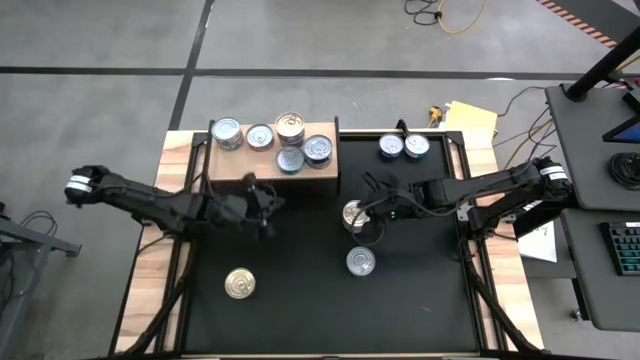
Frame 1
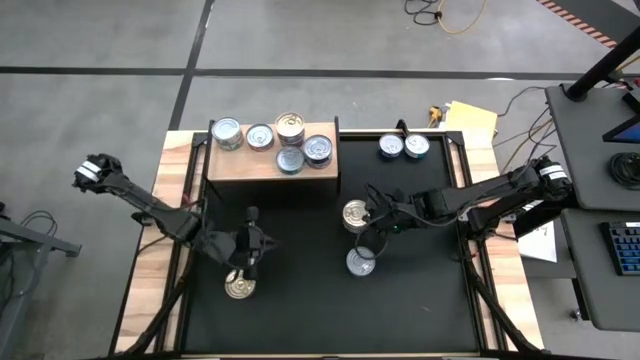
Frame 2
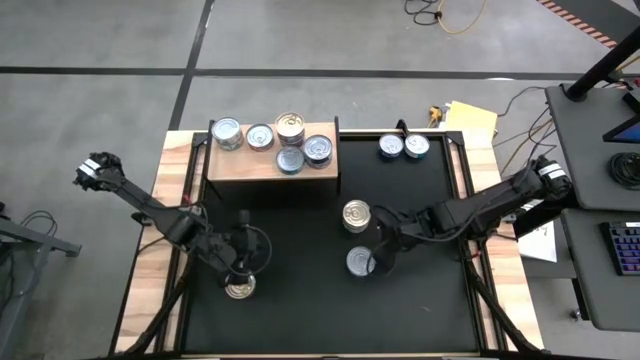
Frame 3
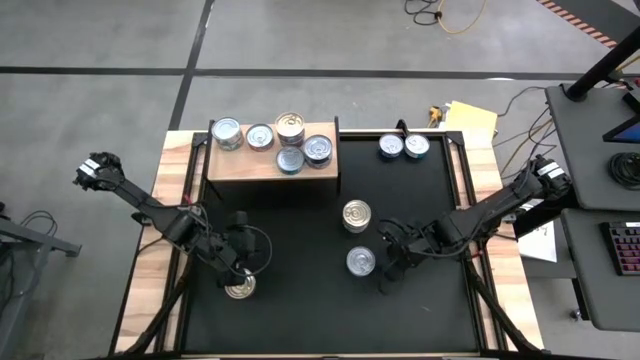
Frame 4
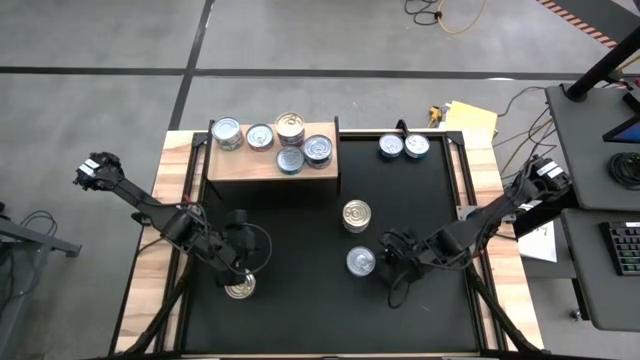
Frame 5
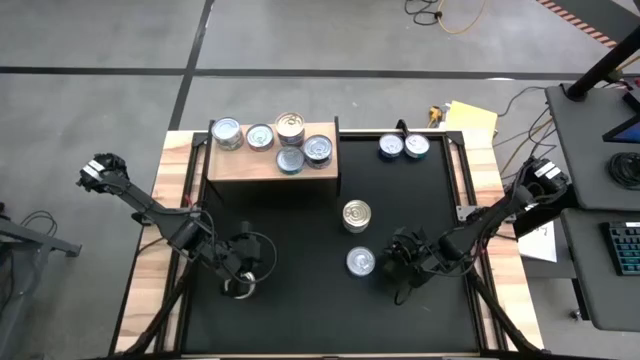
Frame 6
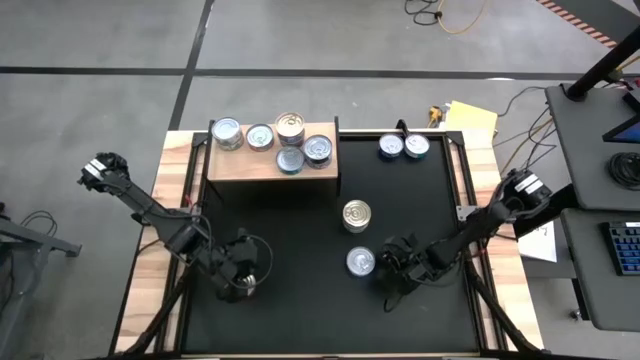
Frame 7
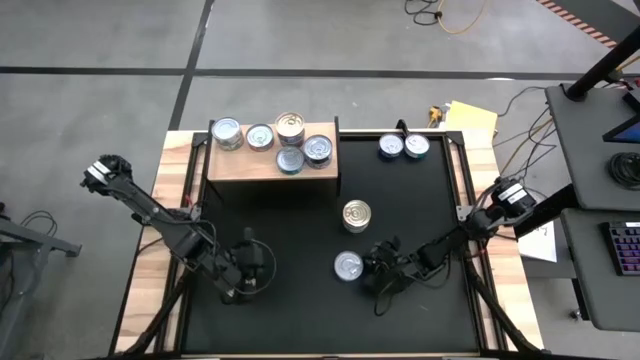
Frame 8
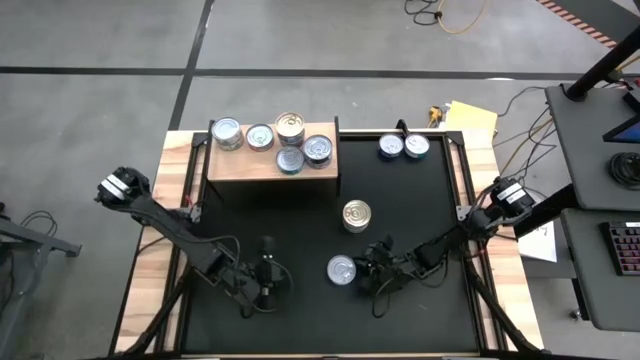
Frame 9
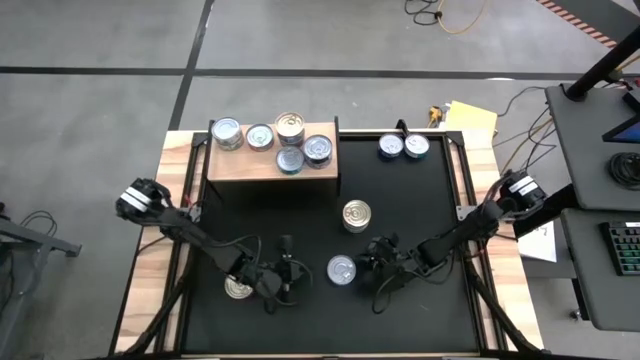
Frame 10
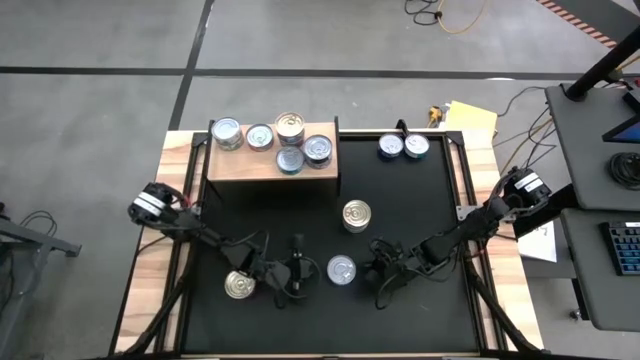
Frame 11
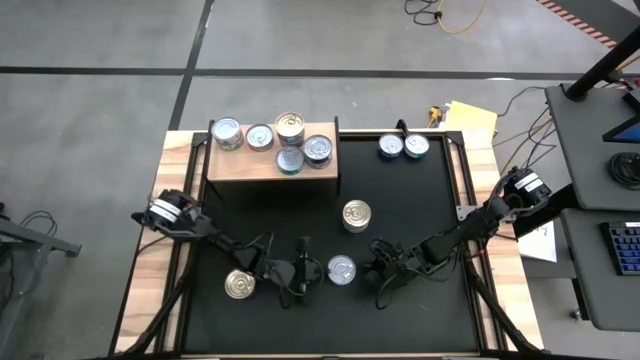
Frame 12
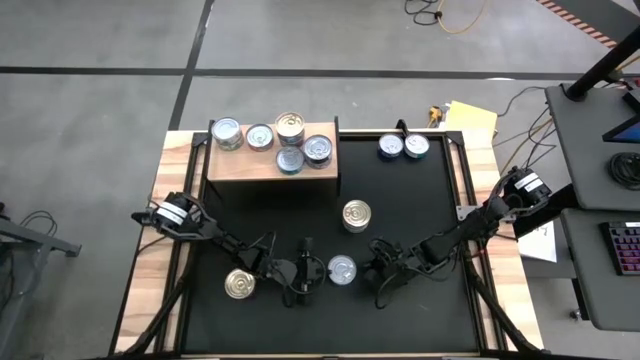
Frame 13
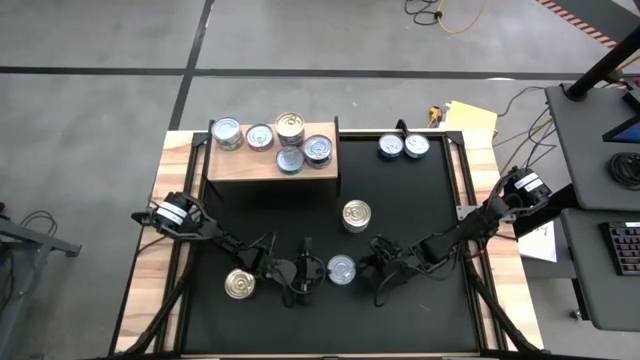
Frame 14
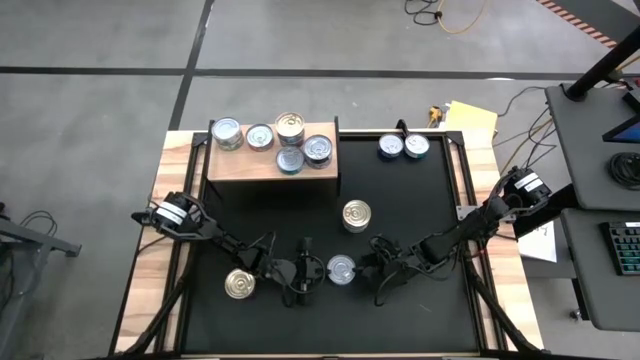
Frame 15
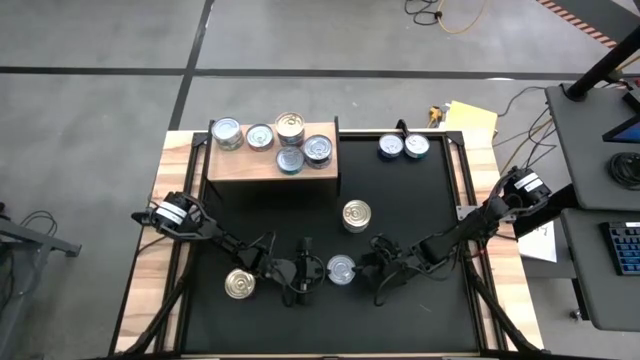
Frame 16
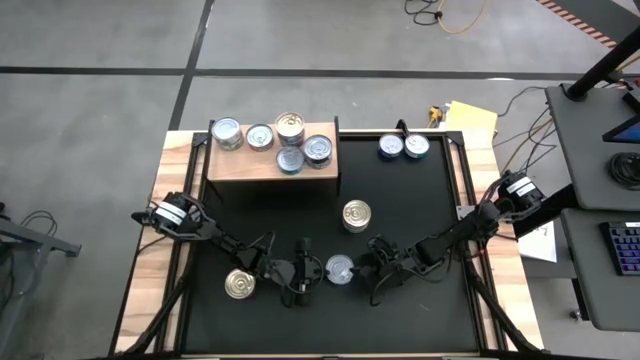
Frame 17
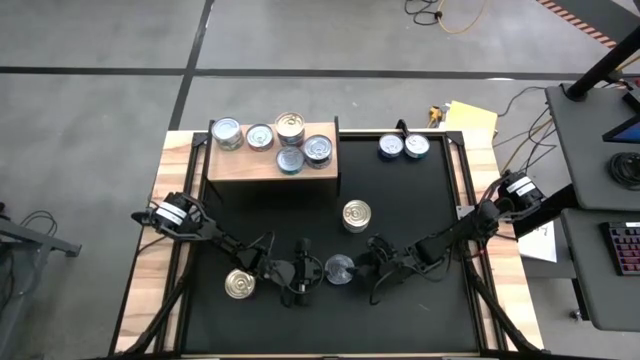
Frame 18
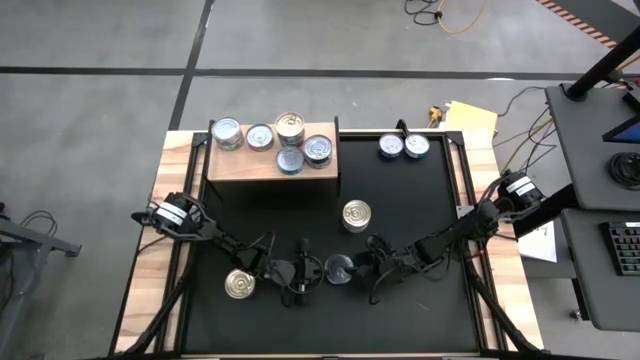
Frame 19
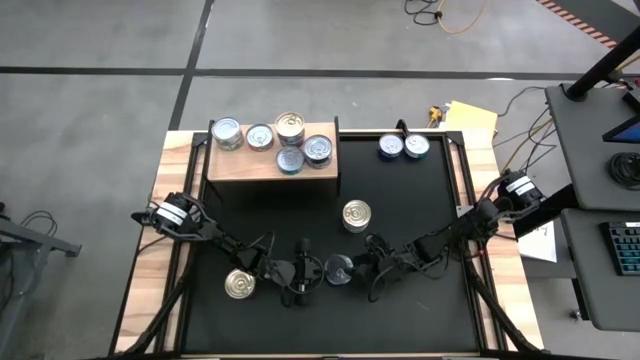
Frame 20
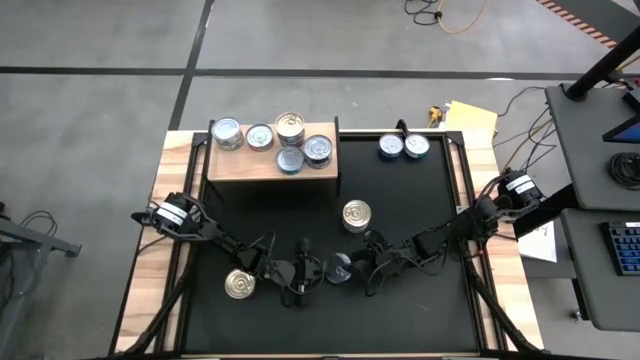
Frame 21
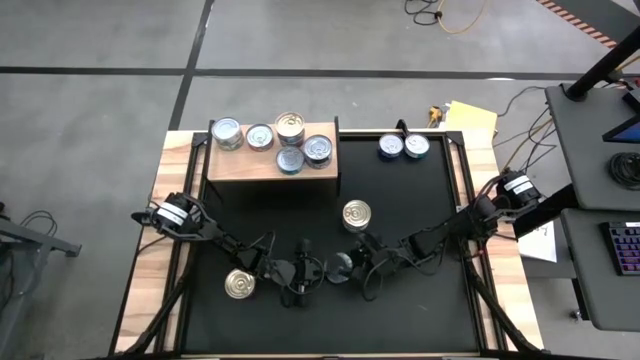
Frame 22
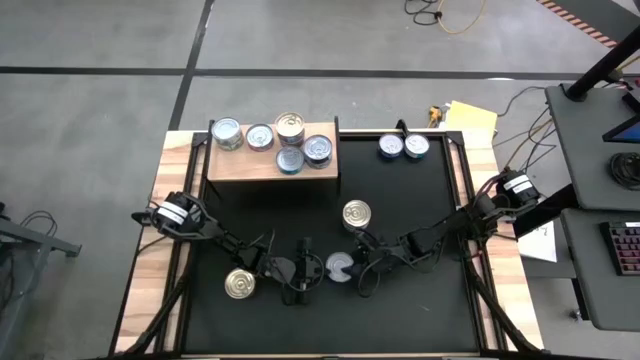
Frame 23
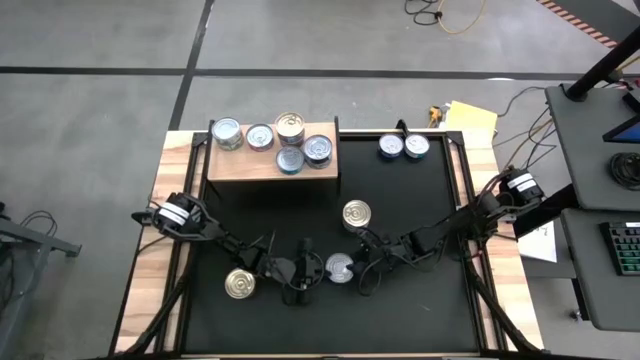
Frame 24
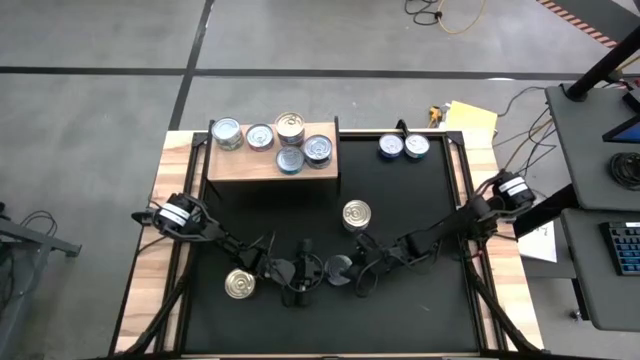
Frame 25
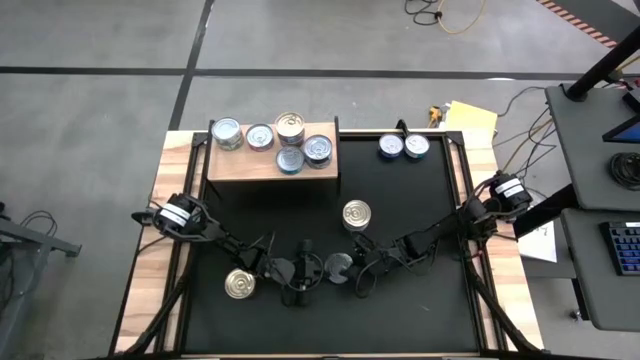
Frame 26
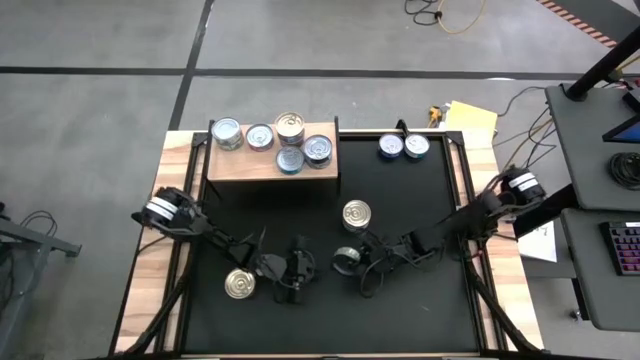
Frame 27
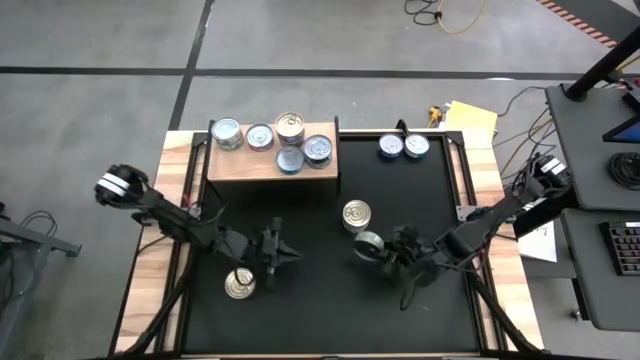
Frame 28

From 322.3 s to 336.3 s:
Task: Stack canned seafood by type on shelf
Put the green tuna can on the shelf

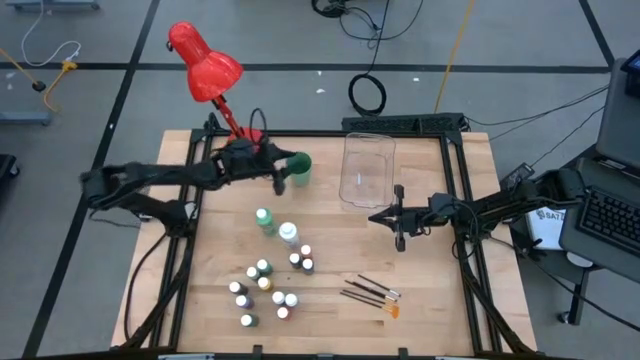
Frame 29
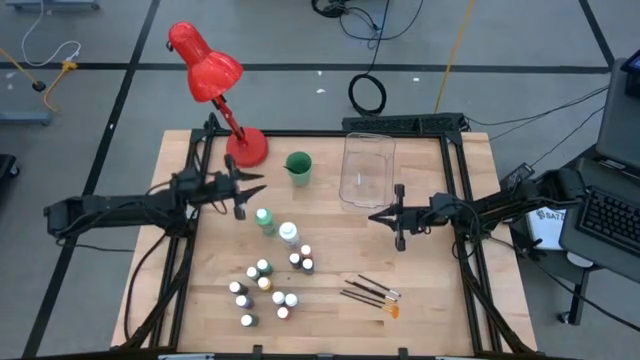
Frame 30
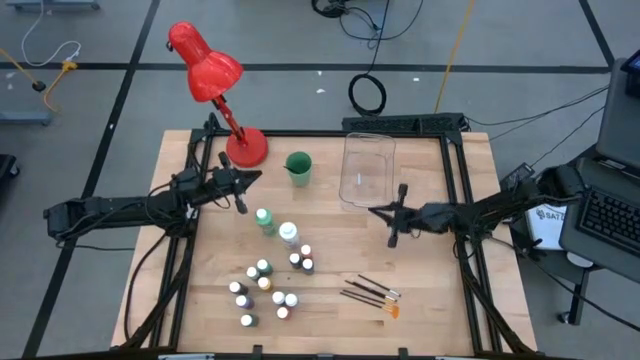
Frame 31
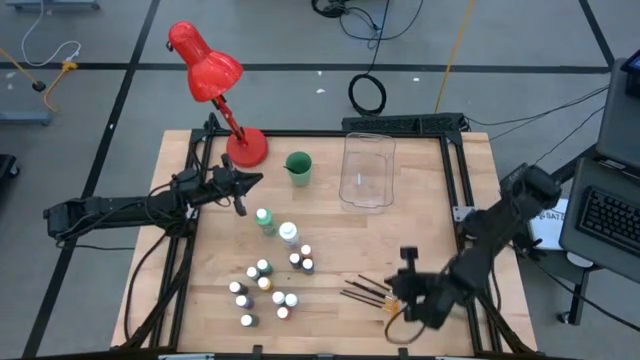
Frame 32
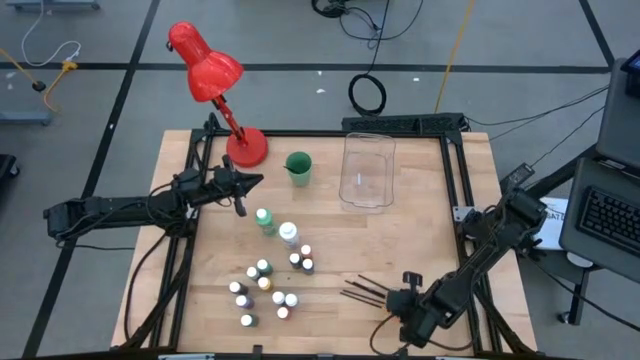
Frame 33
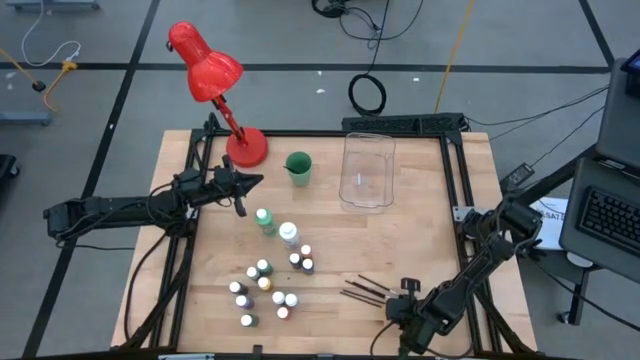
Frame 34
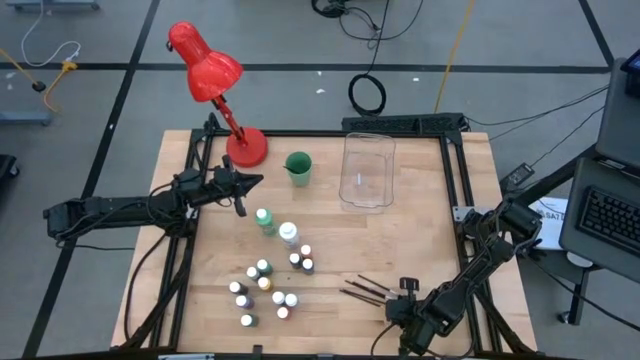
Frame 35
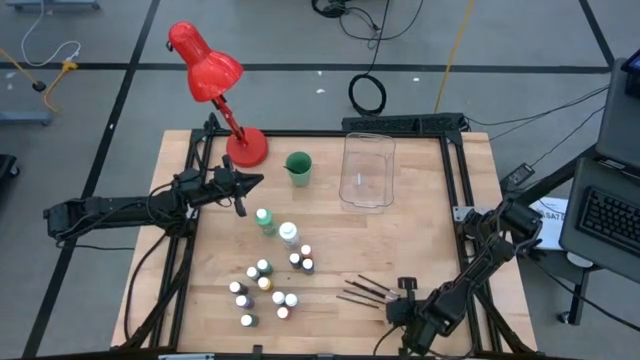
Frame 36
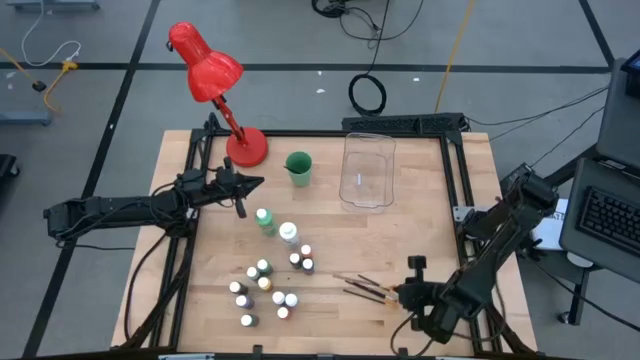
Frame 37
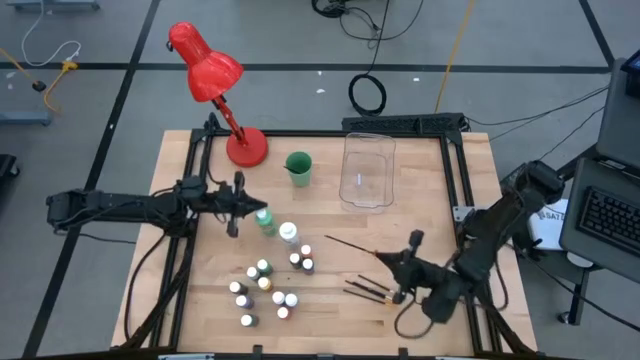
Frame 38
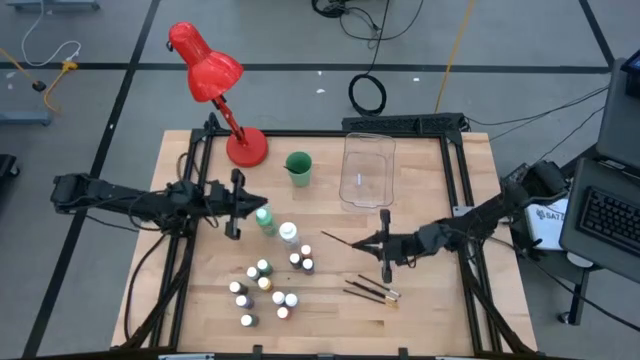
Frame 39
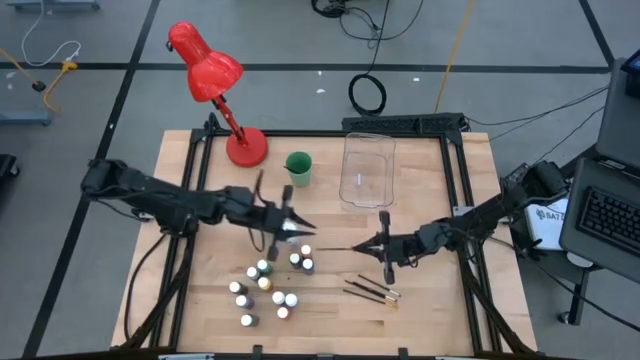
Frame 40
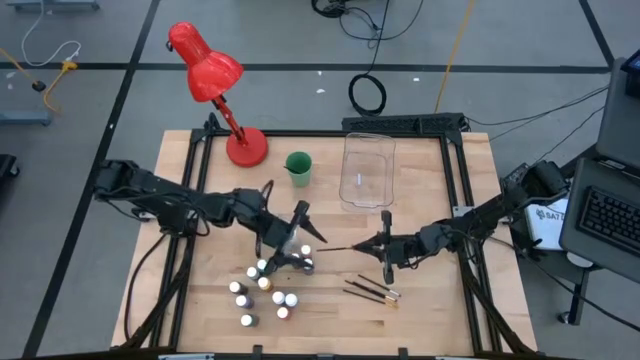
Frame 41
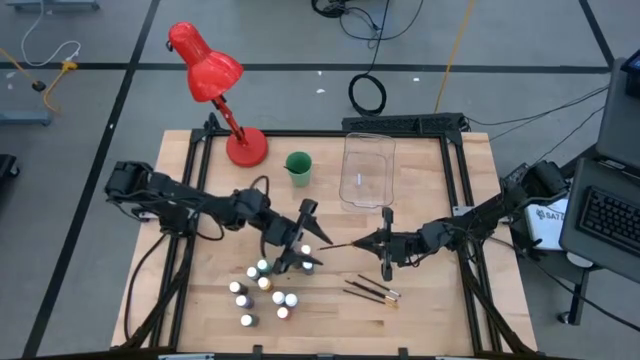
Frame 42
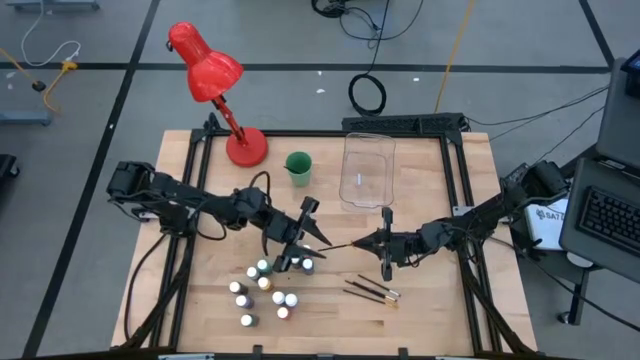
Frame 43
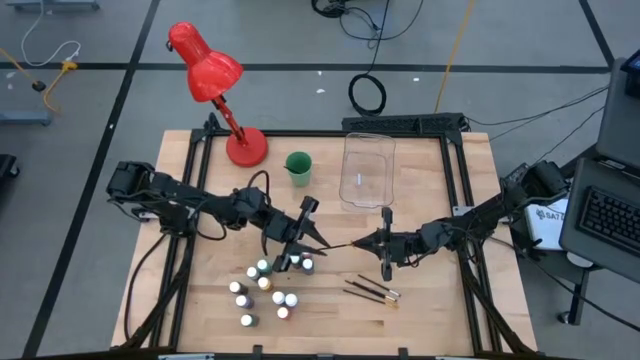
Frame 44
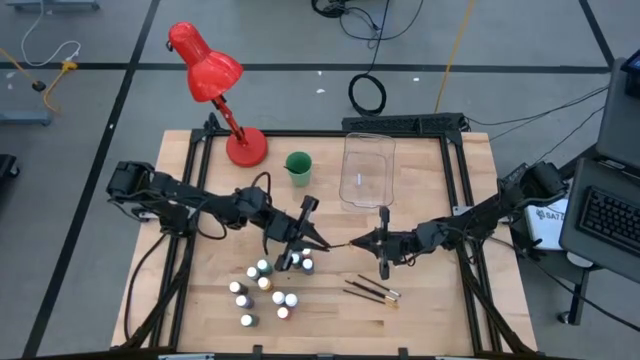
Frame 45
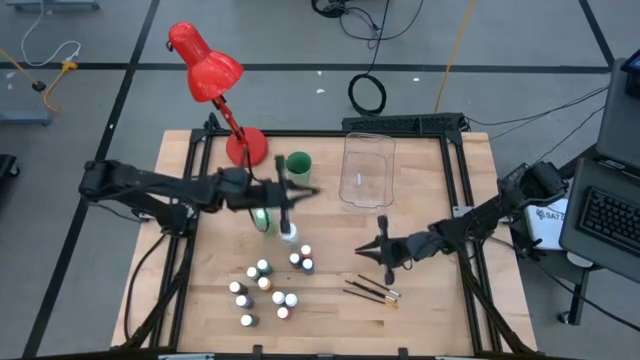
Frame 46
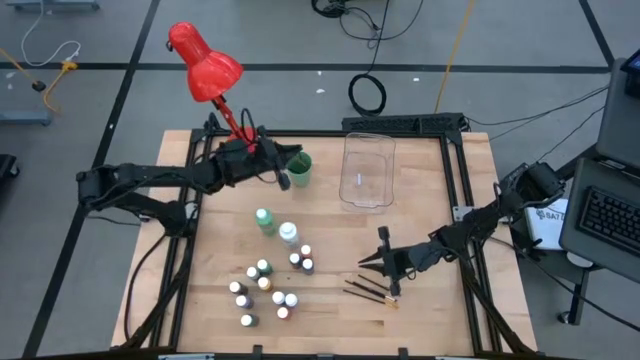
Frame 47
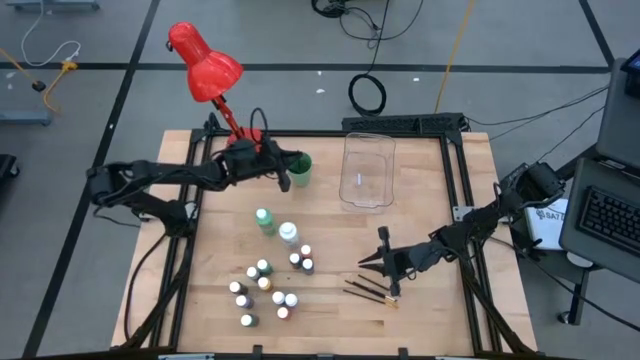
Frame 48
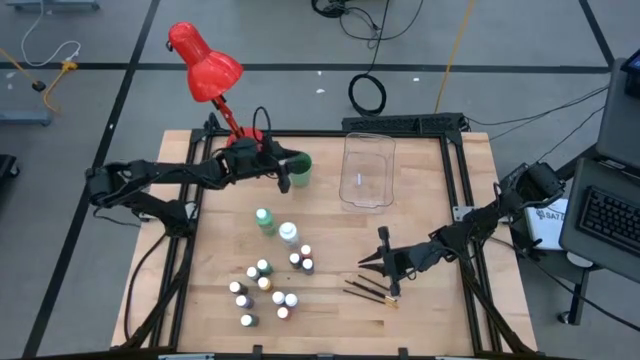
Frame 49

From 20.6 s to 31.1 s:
Task: Pick & Place Paint Supplies
Put the gold paintbrush into the green cup
